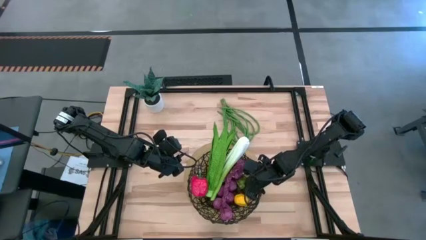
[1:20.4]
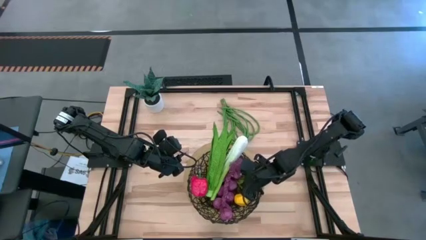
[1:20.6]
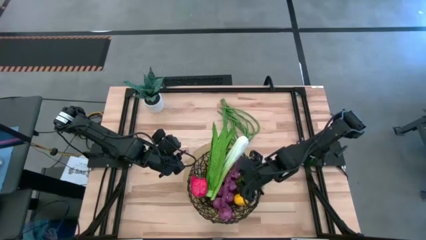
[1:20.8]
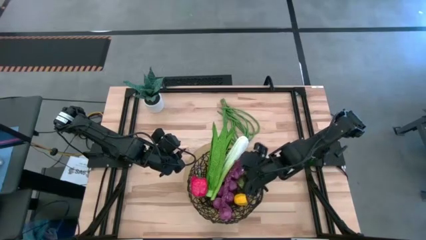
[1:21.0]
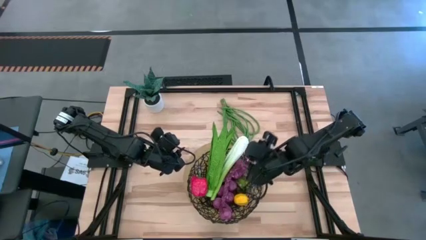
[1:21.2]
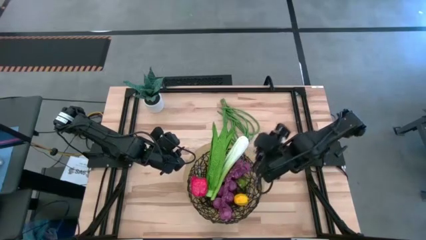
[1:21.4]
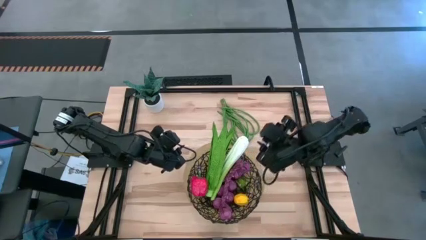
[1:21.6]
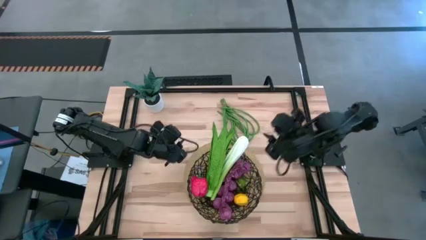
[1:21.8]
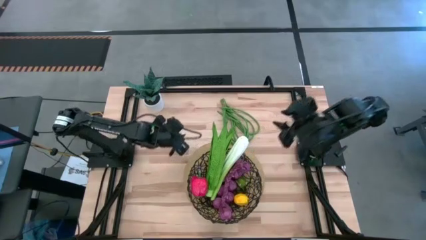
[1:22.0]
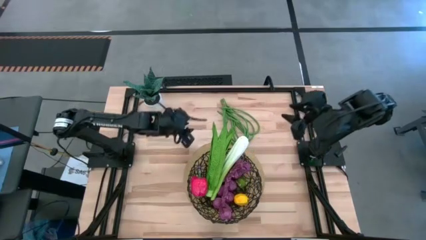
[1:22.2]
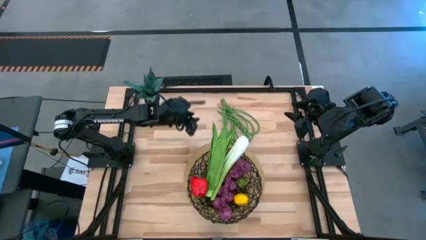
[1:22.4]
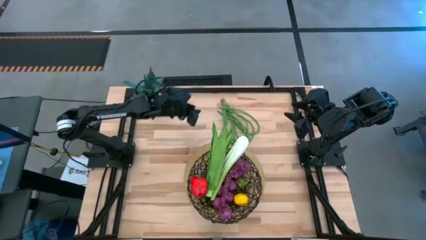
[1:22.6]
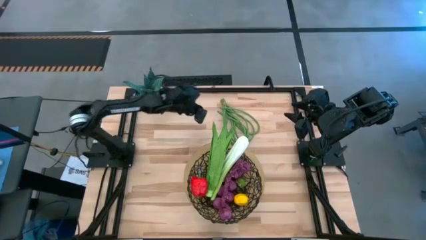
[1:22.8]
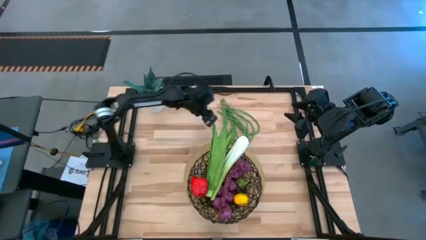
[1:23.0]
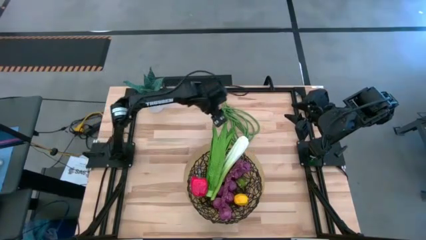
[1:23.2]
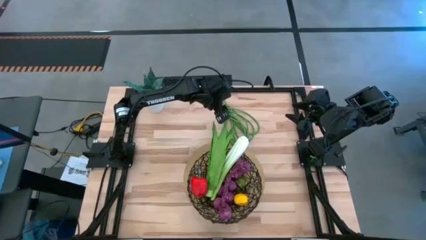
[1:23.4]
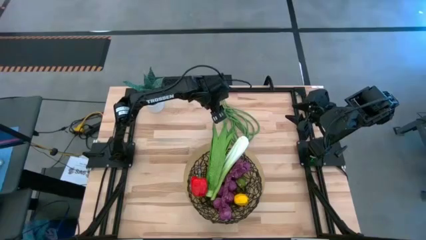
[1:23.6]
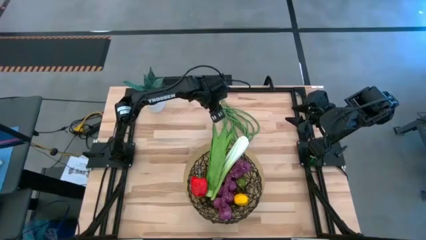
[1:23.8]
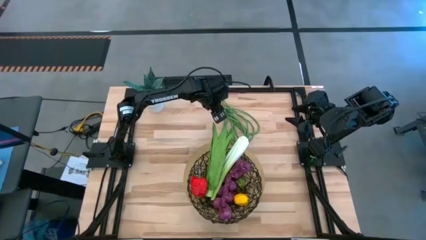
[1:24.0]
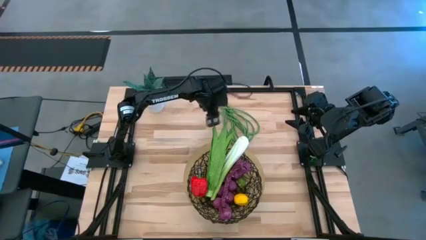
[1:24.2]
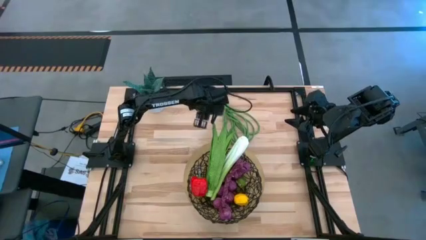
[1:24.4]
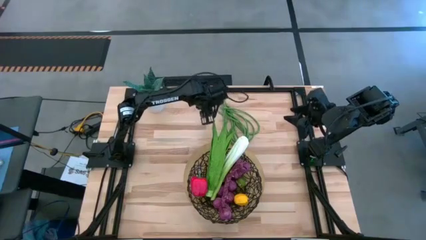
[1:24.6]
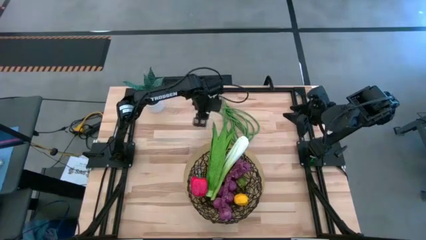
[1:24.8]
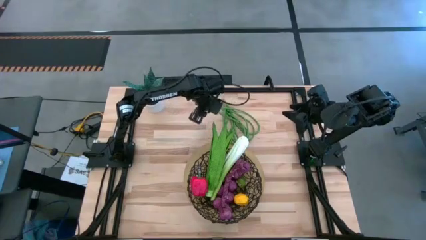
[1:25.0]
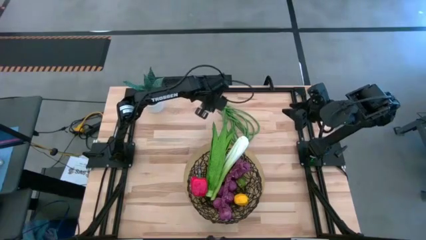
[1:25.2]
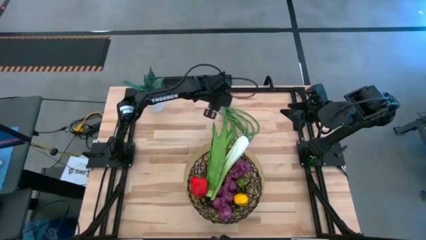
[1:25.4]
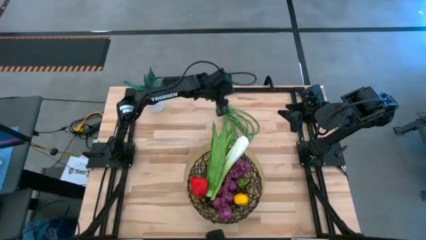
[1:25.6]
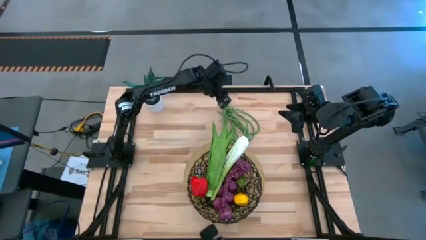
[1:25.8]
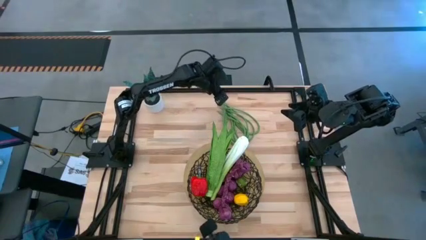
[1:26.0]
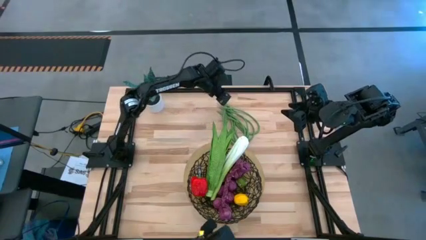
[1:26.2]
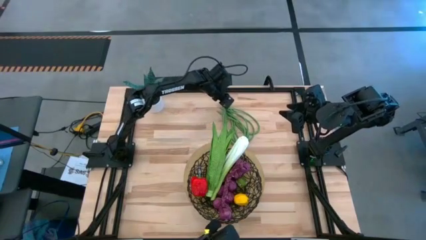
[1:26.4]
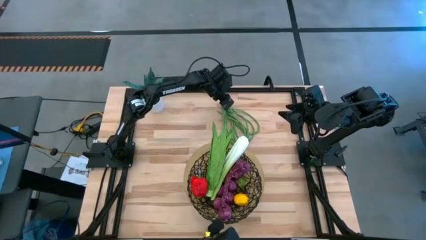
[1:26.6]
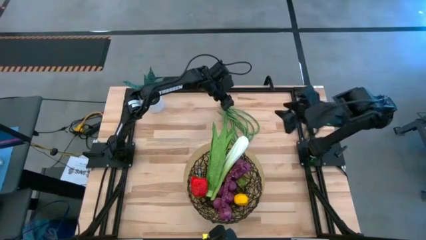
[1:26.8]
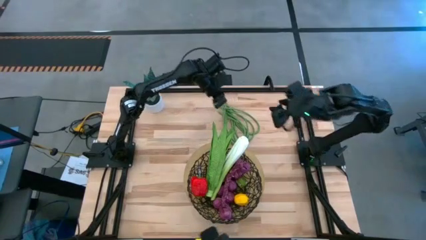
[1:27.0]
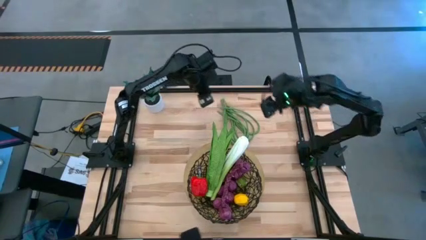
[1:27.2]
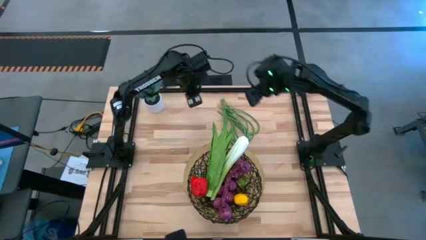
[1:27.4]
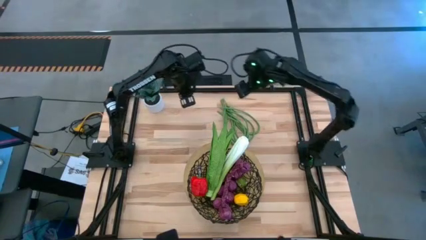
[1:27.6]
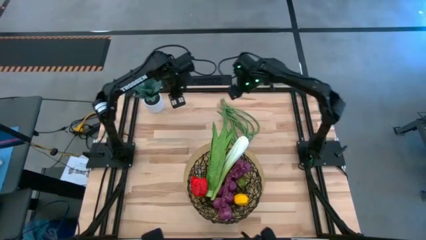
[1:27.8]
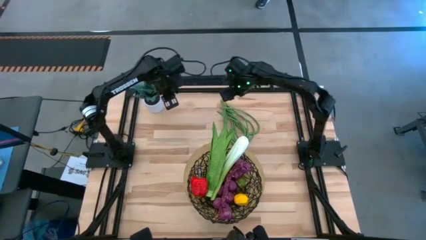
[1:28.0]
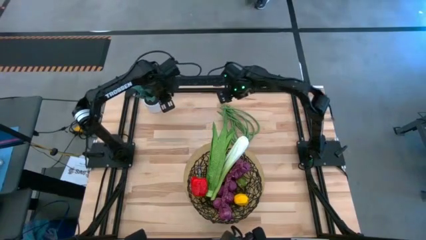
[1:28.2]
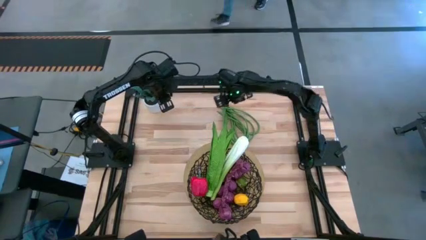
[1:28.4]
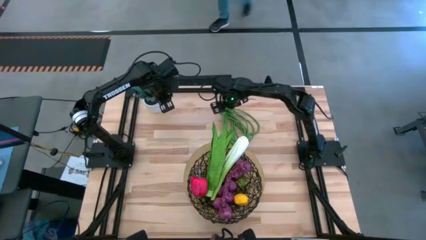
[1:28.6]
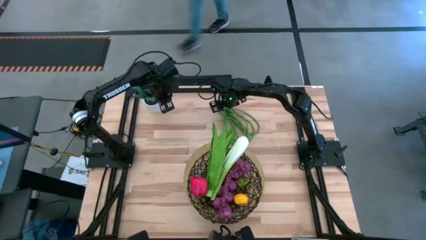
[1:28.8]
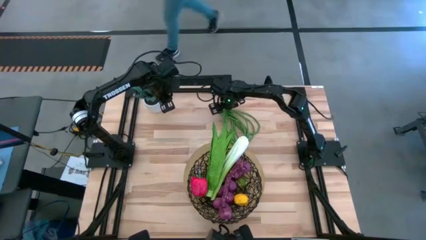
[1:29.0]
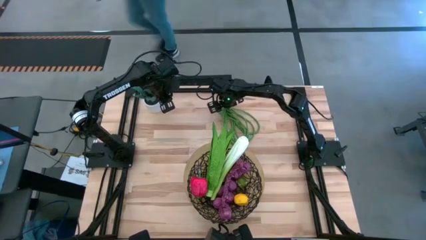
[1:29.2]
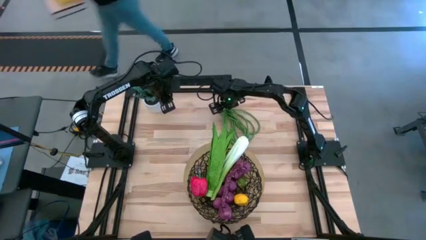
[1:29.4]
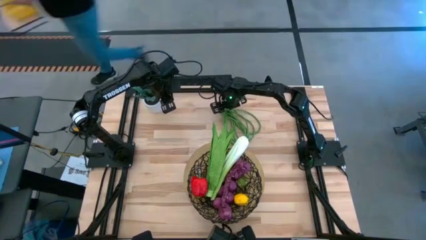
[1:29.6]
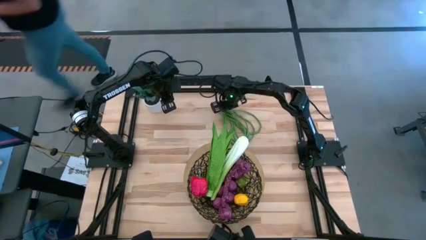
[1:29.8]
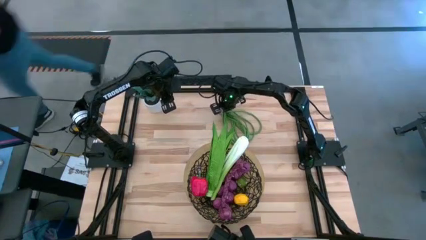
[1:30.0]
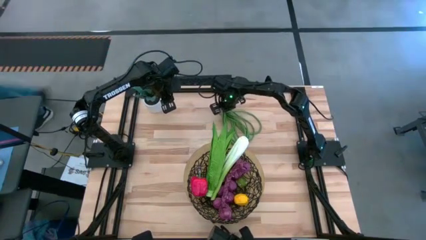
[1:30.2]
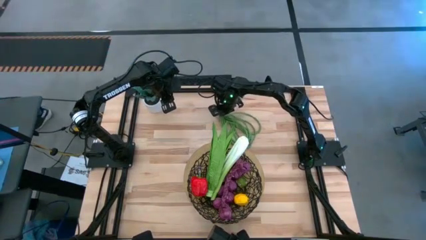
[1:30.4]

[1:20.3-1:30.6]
Task: Build produce basket
Put the green beans into the black basket

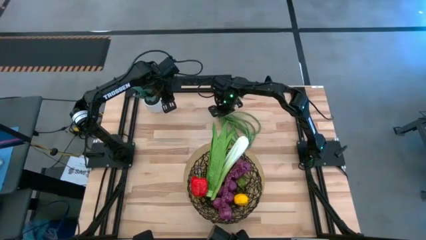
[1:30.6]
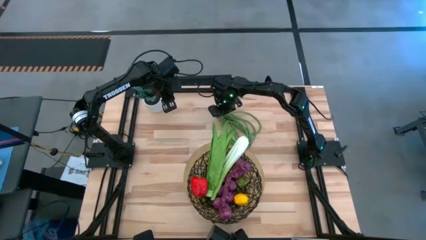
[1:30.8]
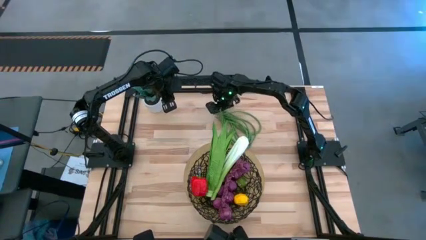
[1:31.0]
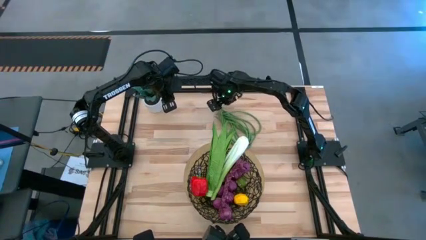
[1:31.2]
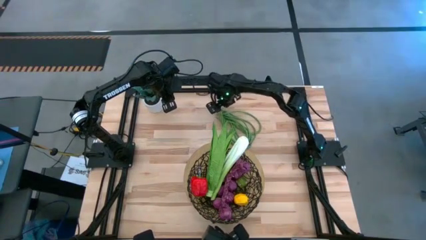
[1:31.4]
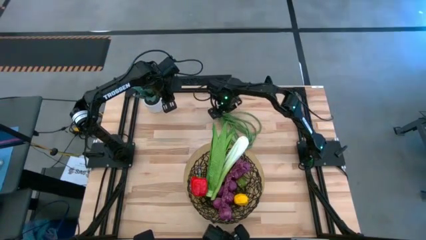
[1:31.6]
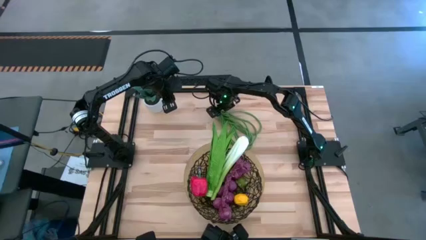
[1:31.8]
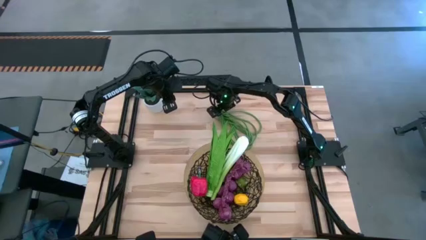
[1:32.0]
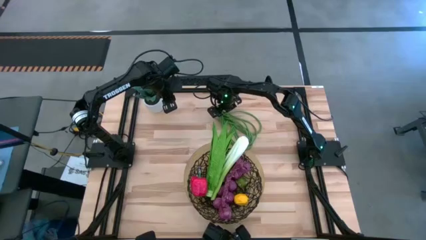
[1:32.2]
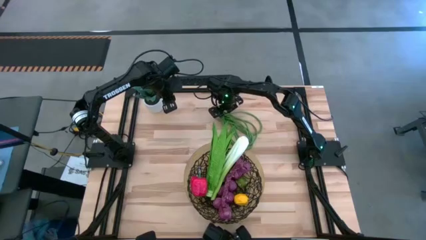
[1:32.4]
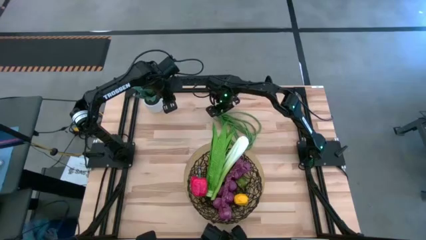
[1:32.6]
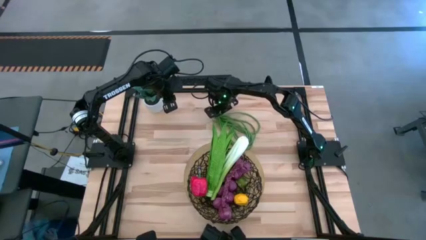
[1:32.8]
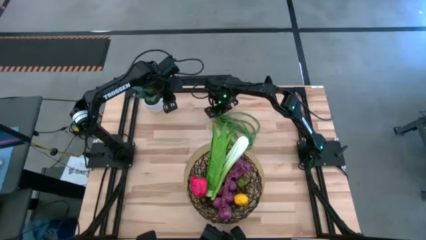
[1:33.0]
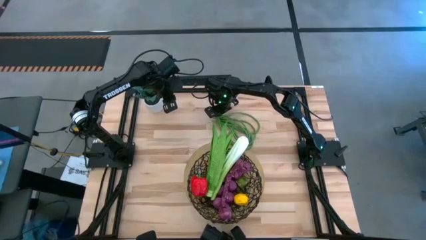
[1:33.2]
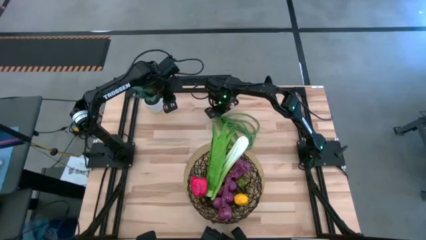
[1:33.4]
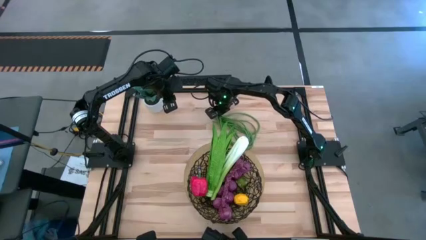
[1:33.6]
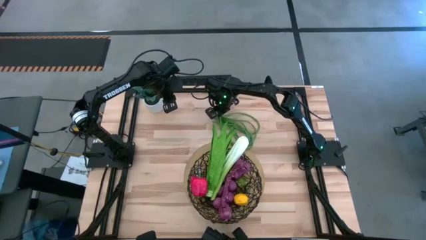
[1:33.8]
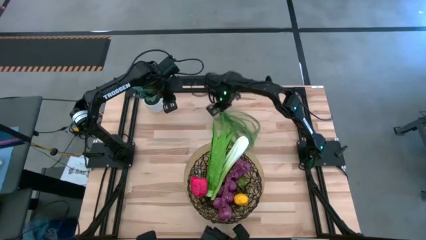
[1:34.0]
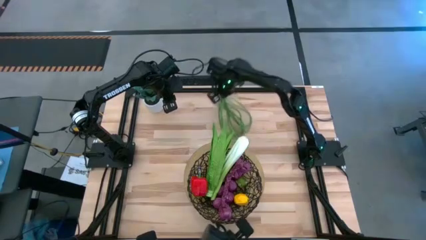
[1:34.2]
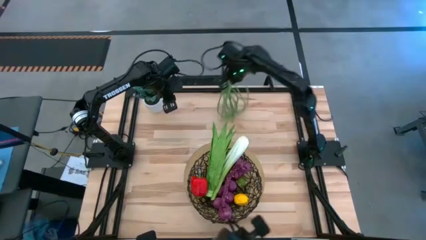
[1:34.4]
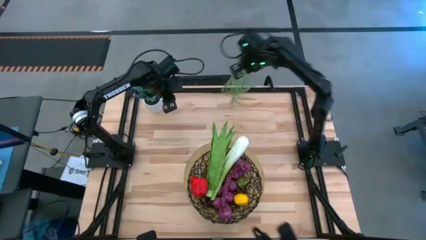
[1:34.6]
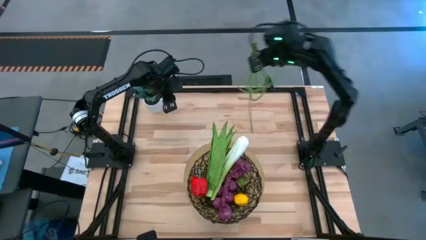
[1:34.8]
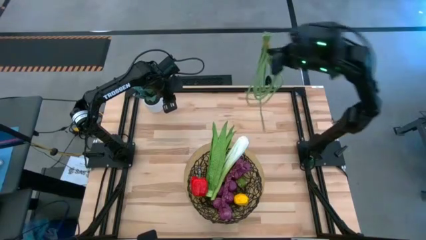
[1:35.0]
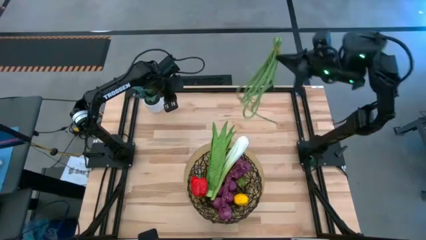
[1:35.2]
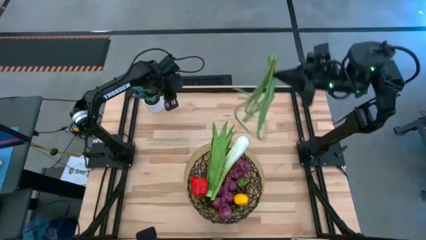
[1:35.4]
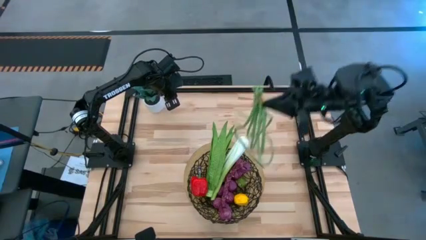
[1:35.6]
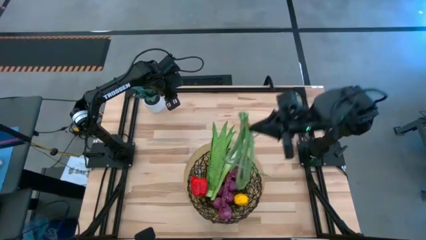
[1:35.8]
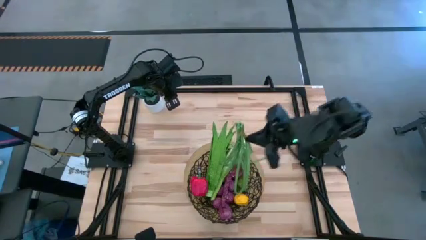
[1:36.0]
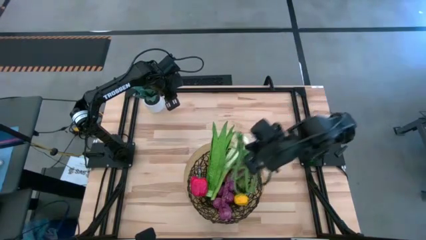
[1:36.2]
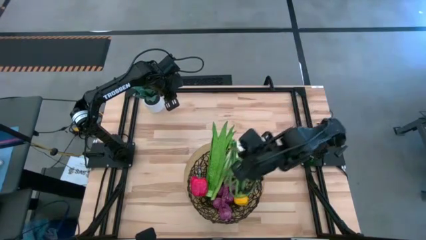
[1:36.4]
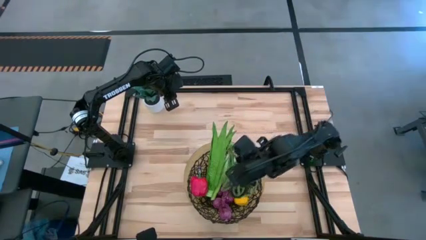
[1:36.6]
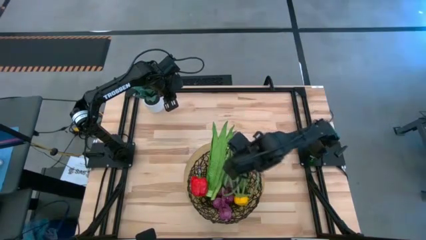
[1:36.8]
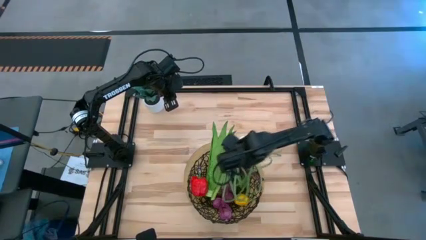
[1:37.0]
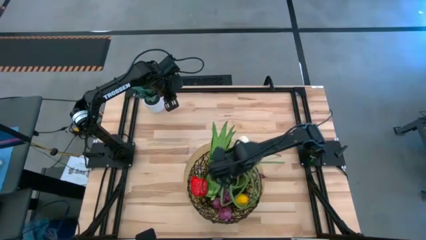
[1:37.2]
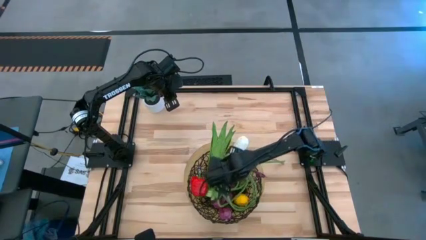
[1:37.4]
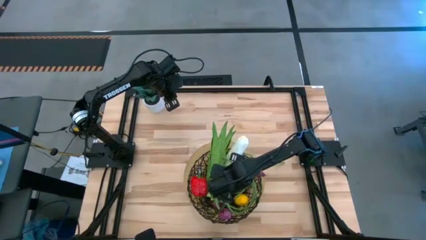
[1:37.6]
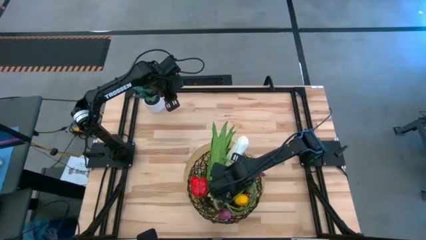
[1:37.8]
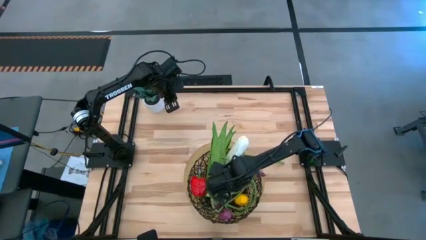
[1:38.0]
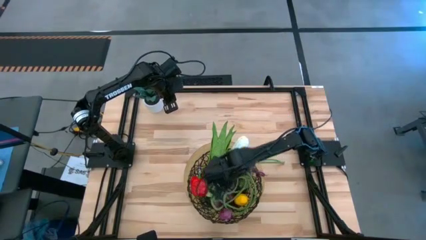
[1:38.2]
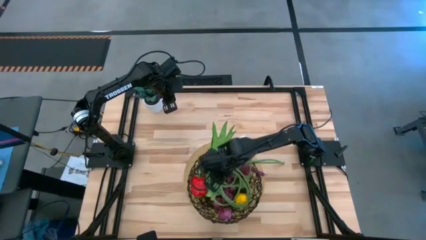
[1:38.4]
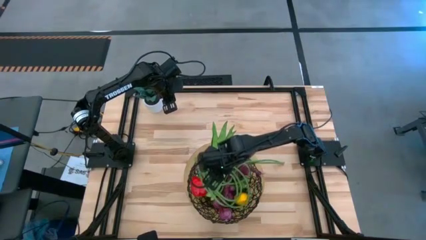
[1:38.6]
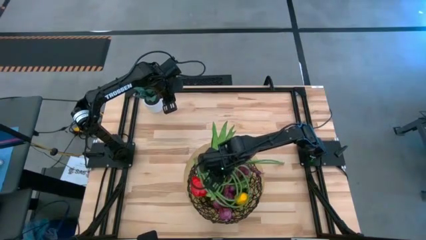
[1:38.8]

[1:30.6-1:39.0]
Put the green beans into the black basket
